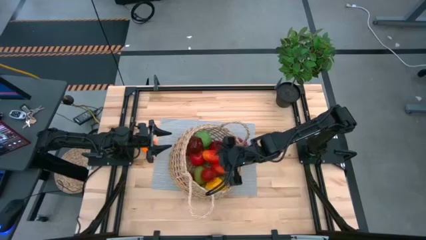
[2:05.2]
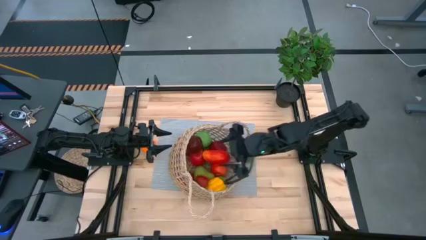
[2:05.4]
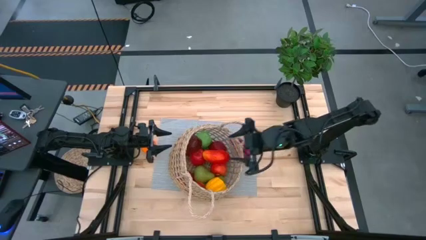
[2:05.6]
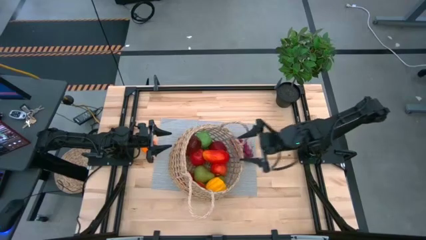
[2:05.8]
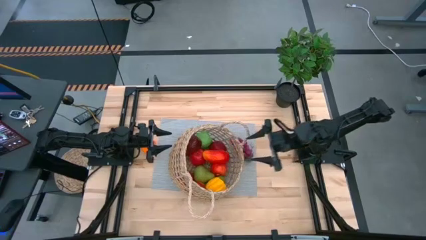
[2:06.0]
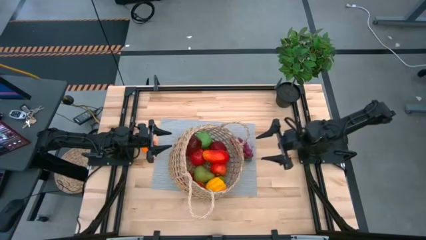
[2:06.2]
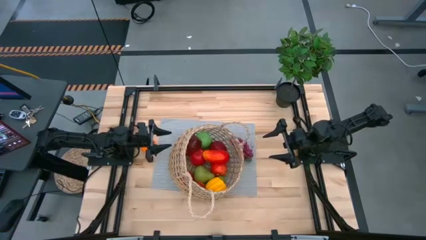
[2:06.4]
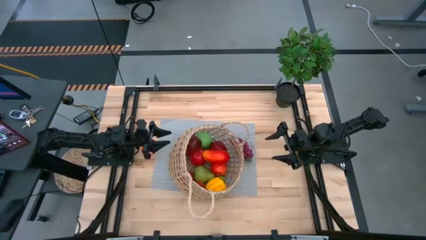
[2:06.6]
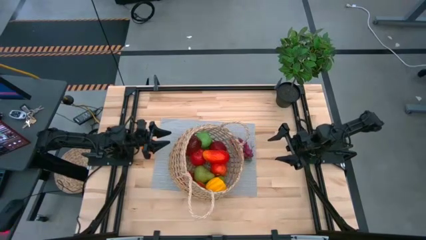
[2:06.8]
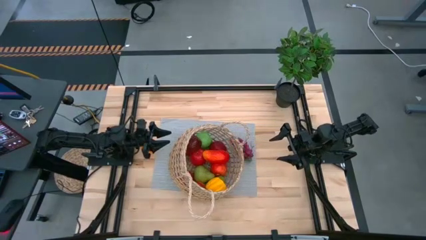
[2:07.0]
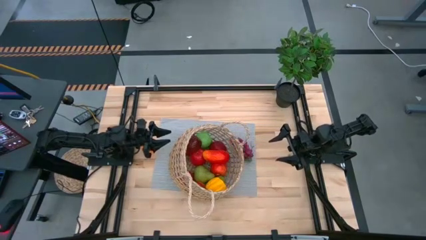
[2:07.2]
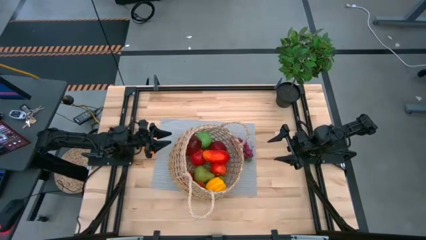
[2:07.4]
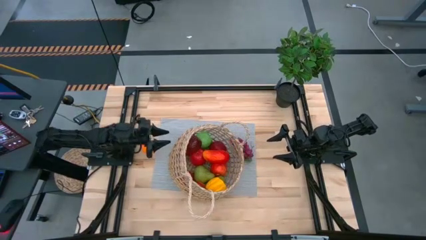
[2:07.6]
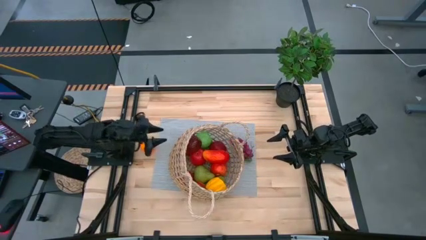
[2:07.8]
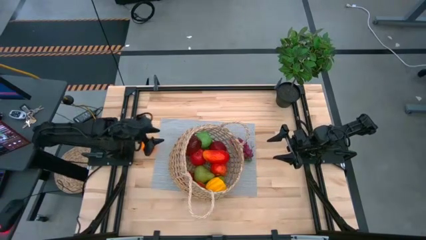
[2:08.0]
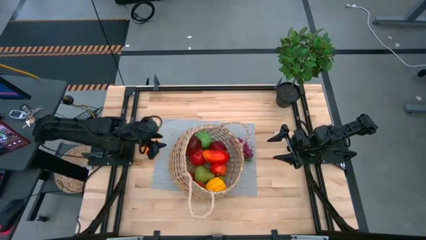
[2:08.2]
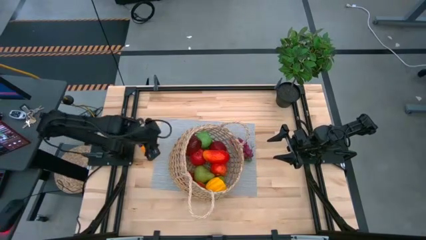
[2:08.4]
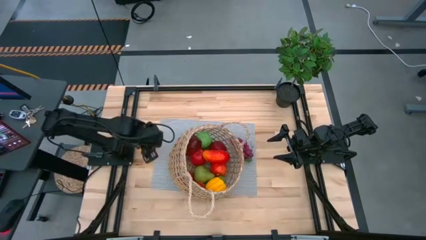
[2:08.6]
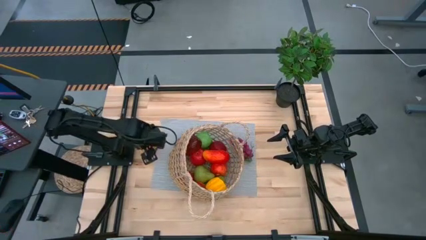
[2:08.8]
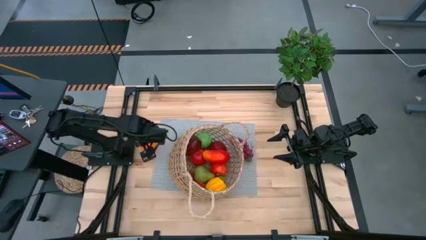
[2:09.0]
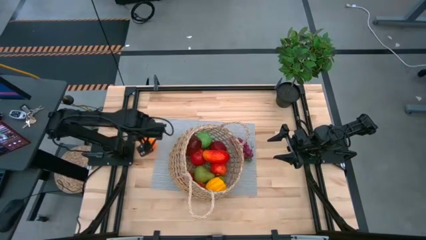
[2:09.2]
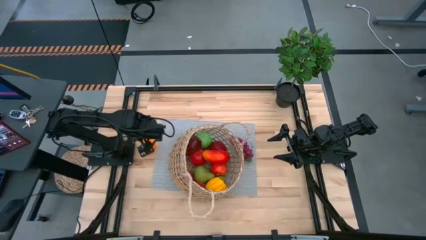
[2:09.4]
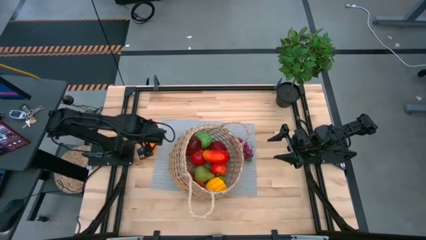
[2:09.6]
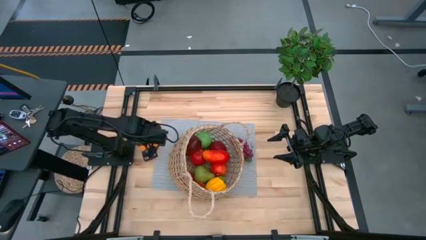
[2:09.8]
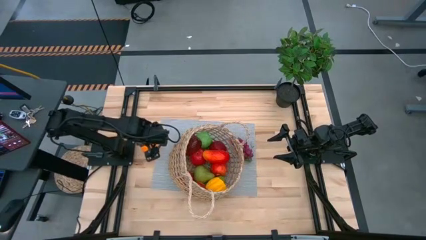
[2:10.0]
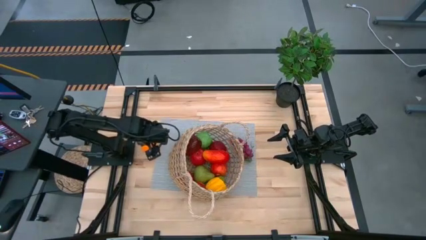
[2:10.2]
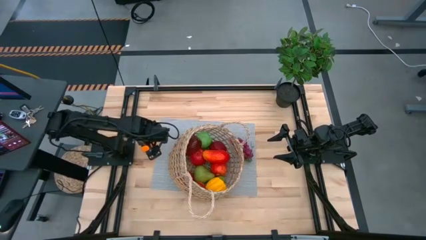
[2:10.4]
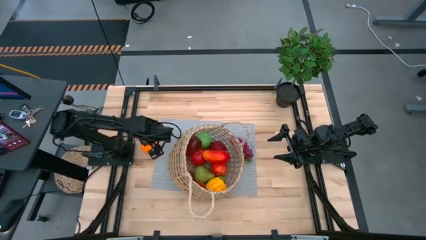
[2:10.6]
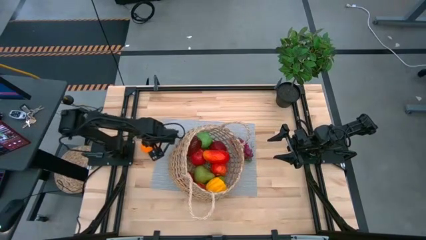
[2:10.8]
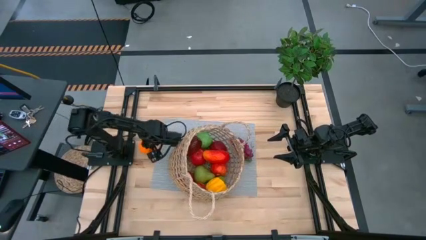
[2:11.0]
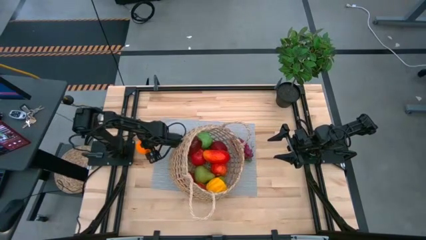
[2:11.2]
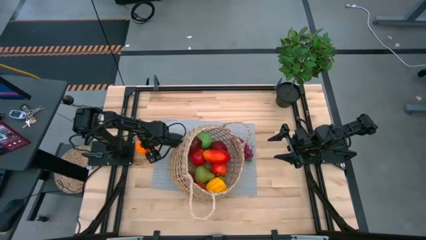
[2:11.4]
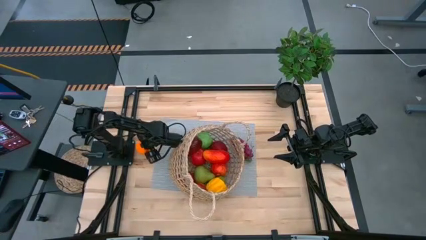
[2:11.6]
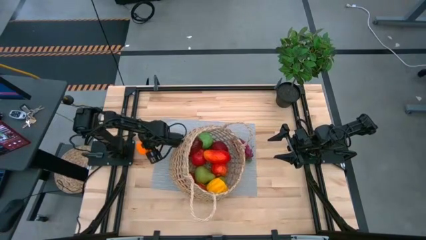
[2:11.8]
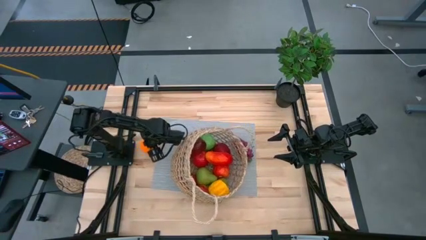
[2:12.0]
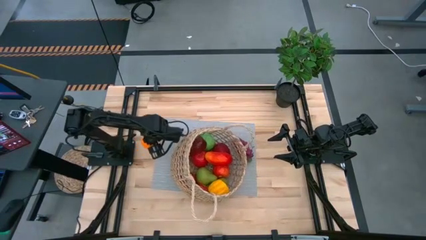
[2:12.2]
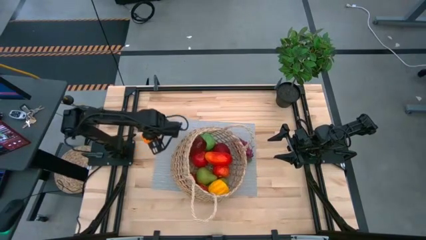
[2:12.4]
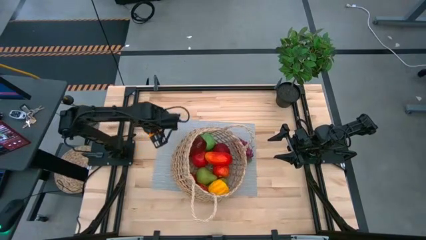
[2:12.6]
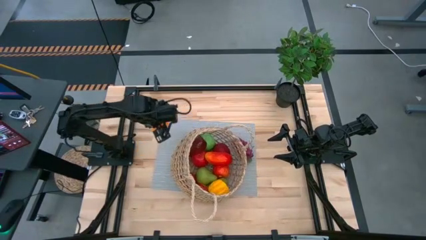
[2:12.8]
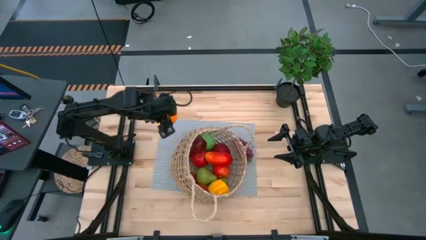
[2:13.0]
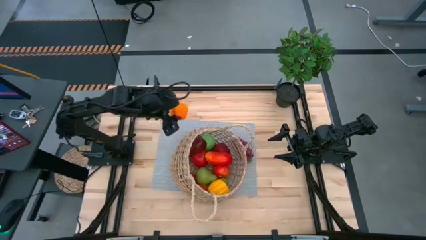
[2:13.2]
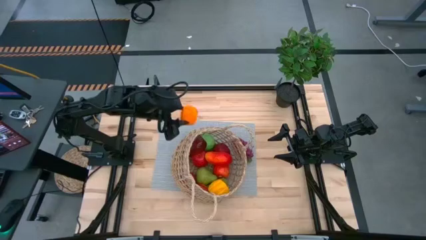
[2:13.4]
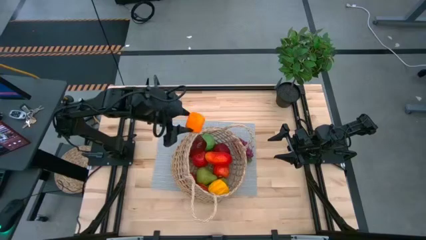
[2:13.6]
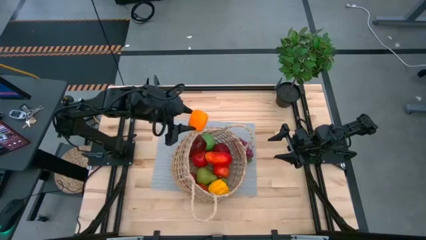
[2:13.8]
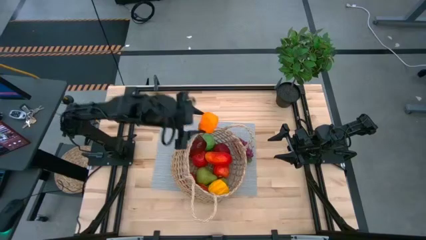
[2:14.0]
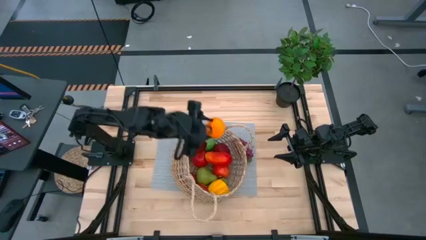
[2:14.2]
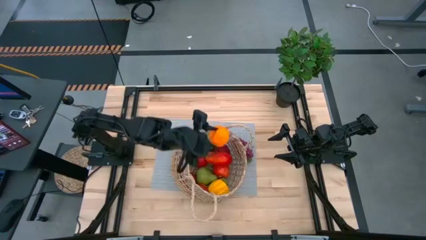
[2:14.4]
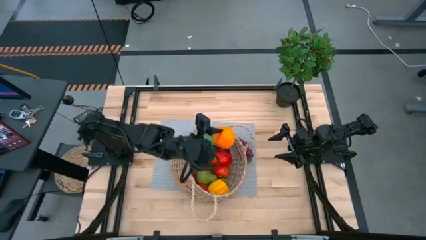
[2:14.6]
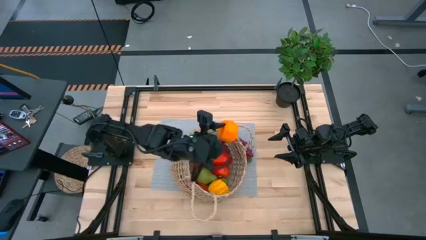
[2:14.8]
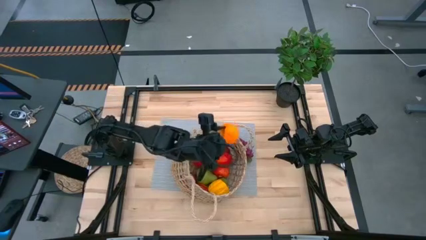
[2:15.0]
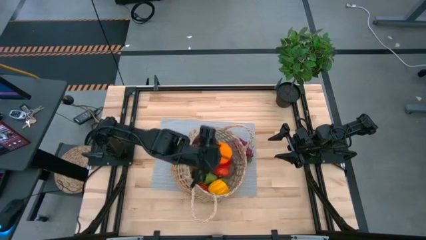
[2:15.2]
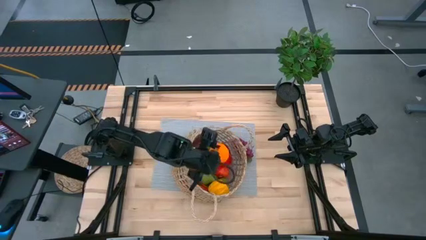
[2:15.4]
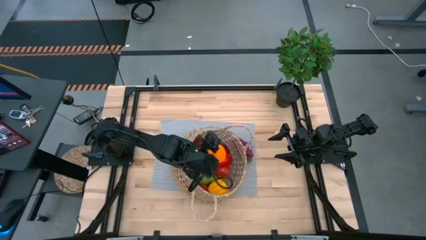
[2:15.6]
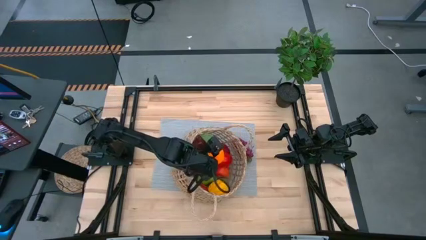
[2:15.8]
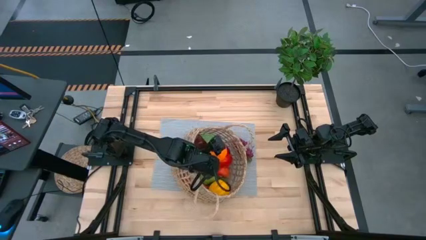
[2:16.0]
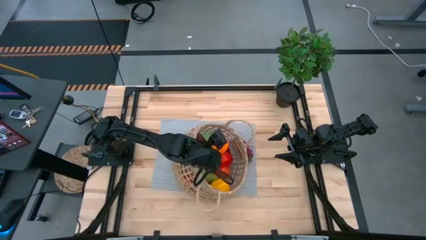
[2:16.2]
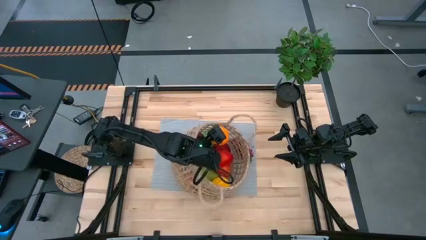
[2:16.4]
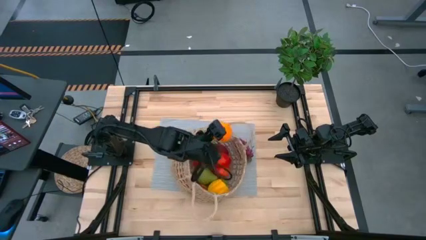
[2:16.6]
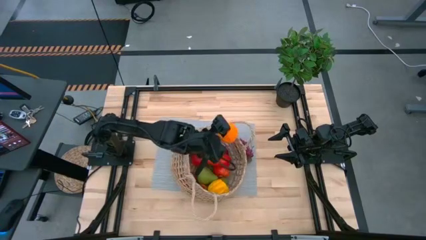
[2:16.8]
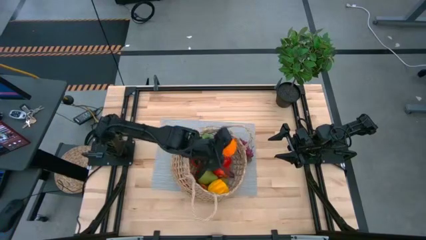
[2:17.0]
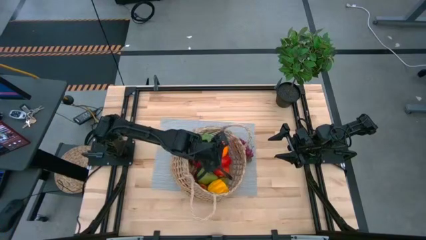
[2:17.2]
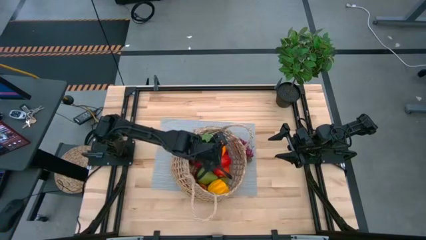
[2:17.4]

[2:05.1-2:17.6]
Task: Build produce basket
Put the orange into the basket

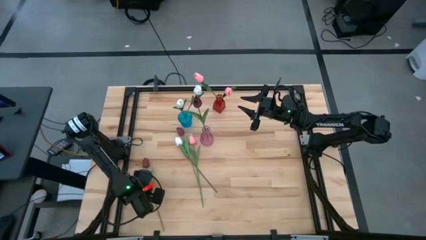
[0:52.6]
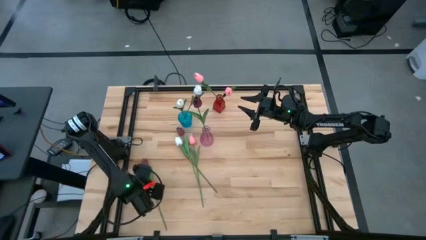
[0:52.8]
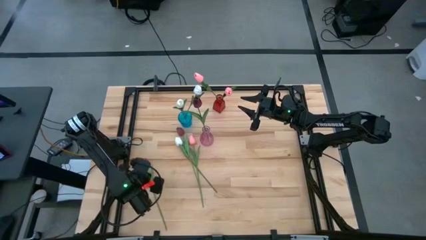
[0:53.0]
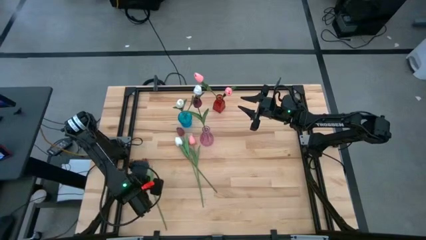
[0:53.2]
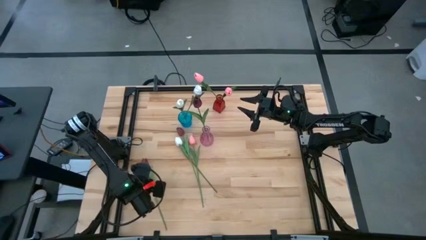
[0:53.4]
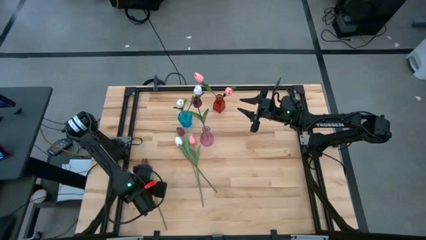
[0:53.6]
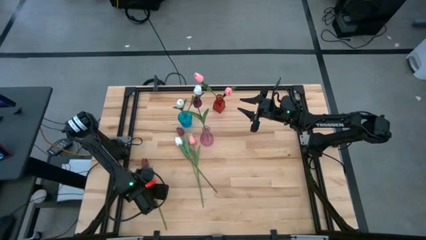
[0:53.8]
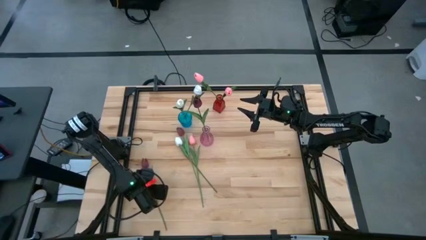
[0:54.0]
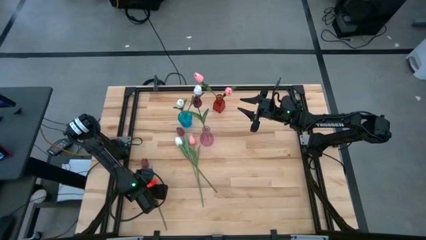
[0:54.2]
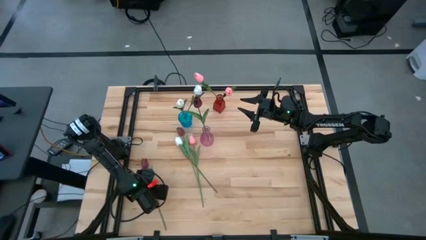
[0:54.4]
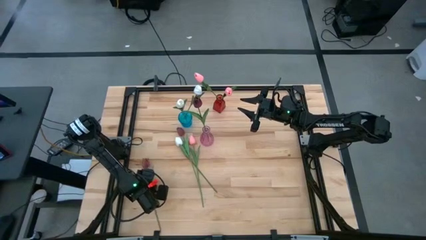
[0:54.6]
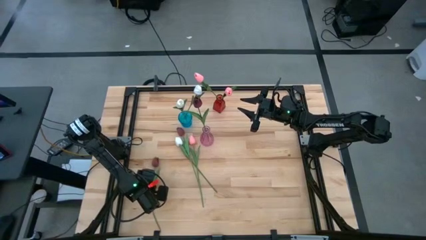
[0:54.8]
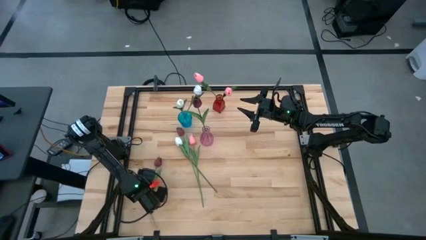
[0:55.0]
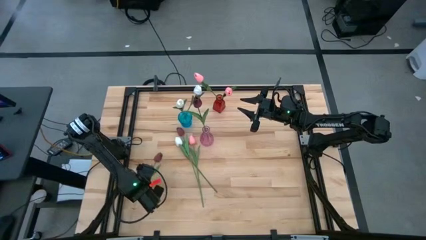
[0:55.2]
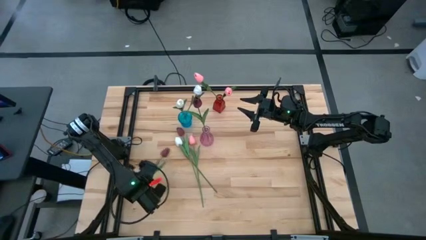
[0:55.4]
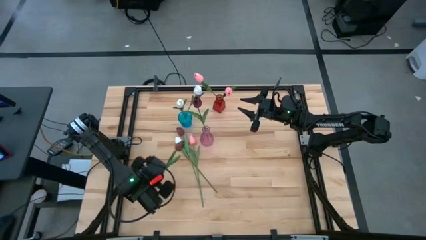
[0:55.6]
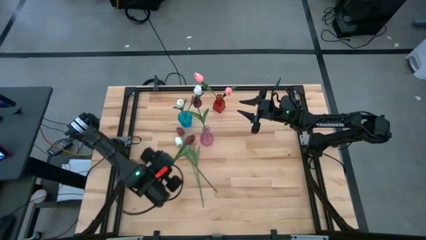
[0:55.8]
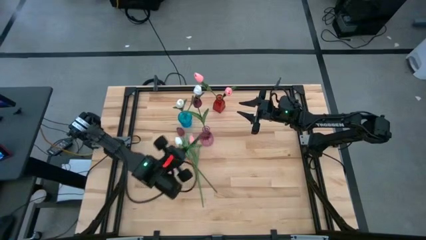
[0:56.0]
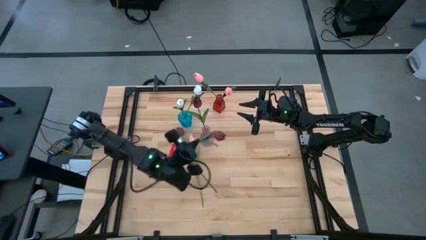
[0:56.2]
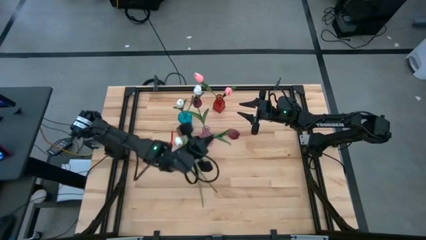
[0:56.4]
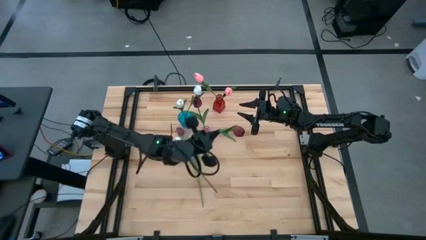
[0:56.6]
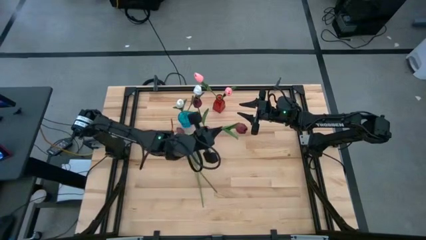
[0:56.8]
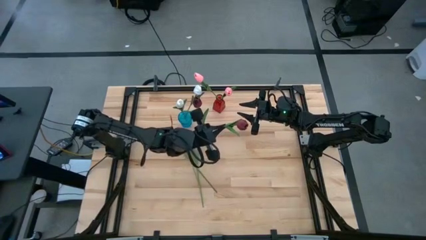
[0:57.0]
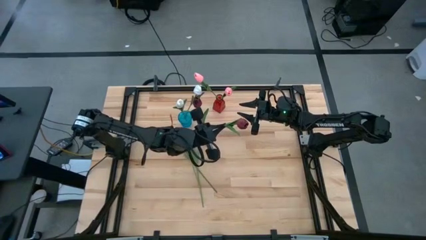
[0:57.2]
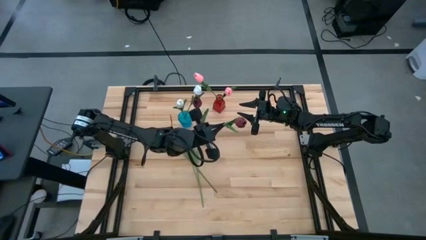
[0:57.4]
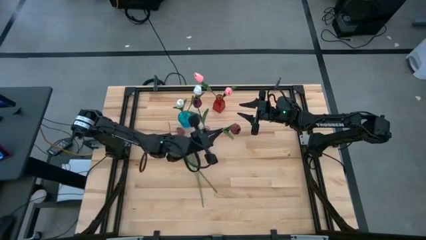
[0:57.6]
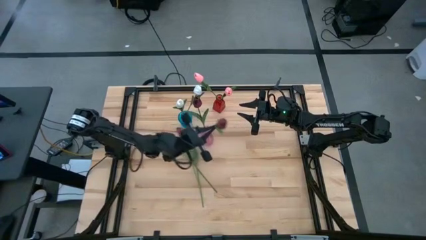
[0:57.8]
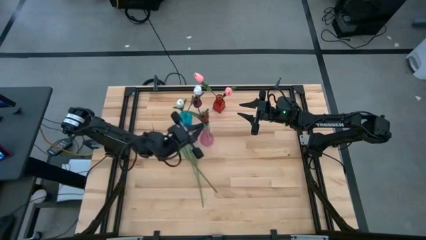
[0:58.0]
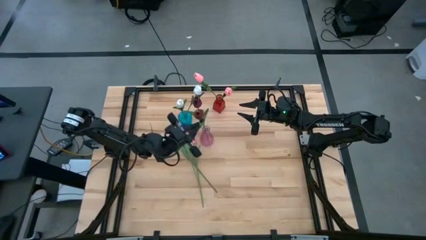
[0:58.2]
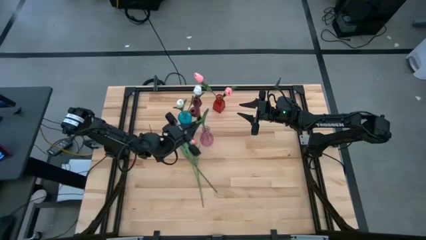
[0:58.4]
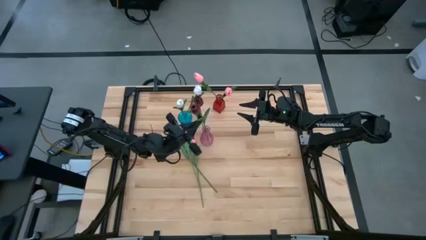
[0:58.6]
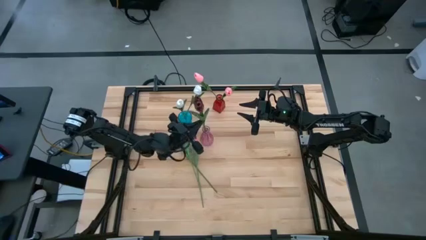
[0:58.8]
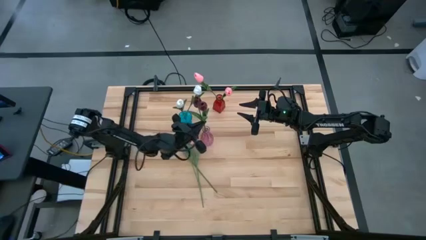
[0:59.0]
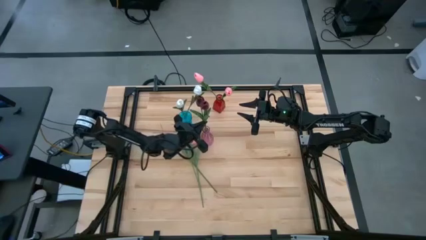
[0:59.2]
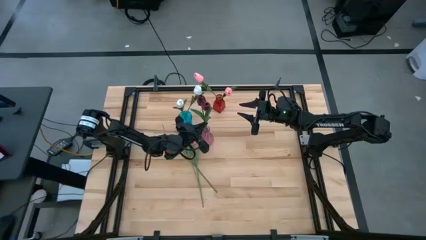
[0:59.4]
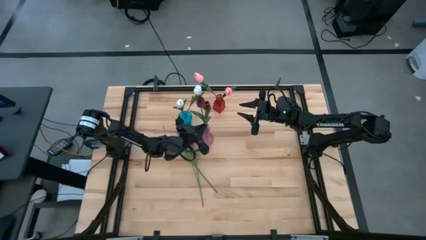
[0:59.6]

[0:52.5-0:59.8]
Task: Sort flowers into vase by color
Put the bottom dark red flower into the pink vase
